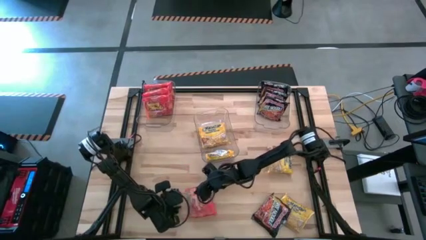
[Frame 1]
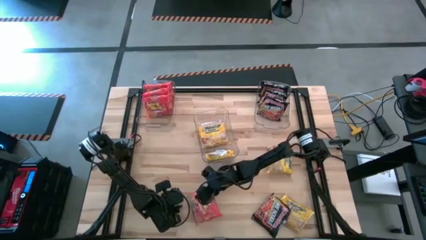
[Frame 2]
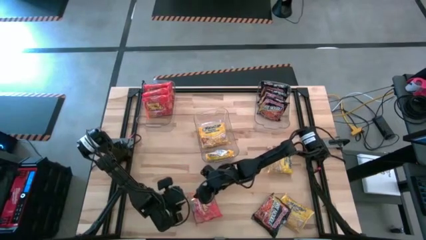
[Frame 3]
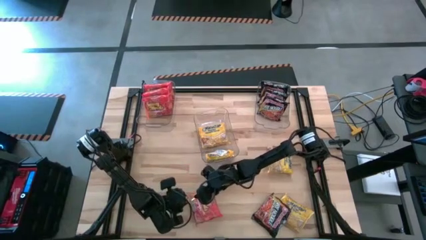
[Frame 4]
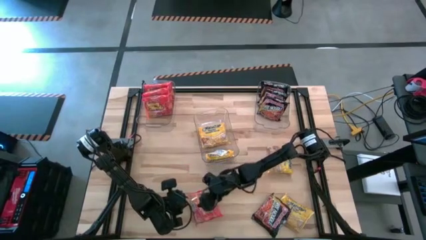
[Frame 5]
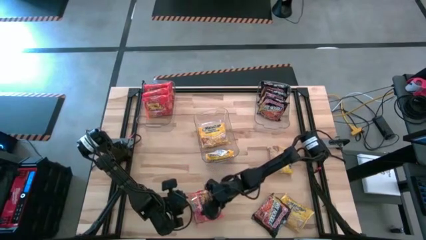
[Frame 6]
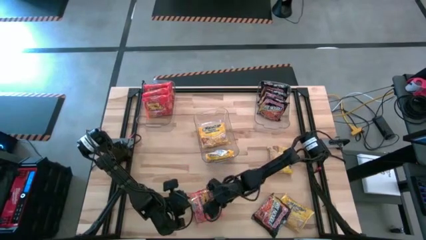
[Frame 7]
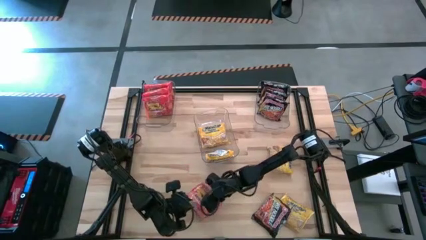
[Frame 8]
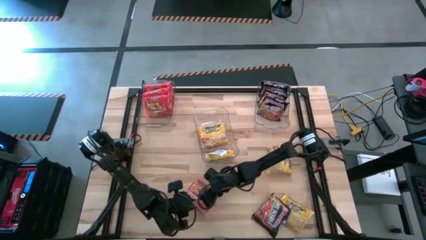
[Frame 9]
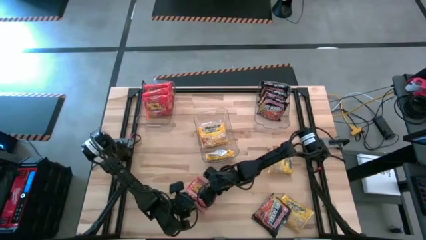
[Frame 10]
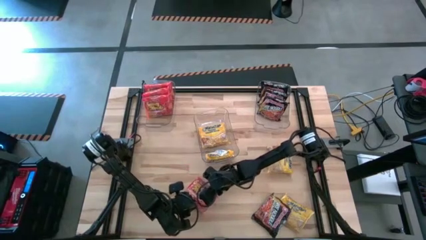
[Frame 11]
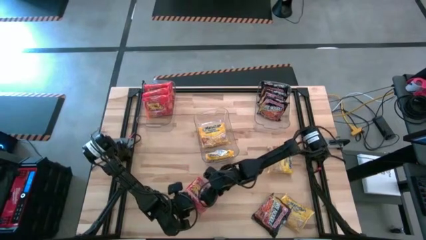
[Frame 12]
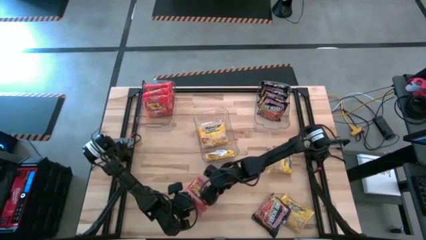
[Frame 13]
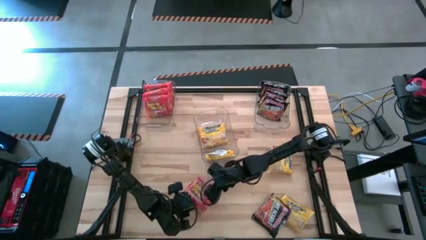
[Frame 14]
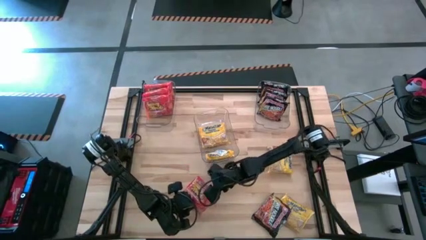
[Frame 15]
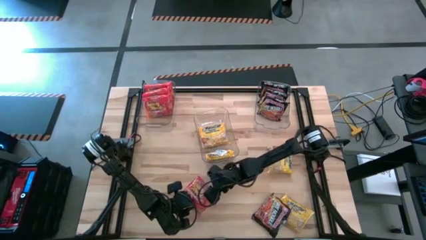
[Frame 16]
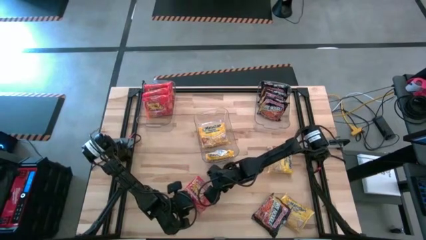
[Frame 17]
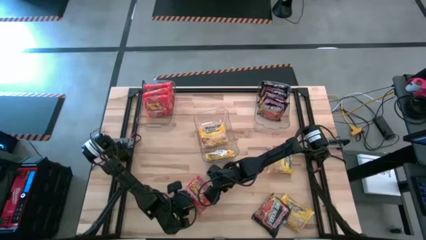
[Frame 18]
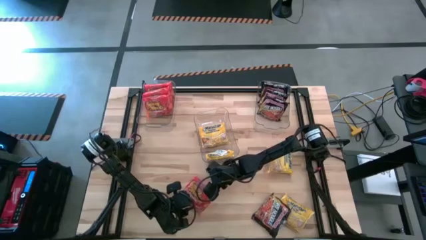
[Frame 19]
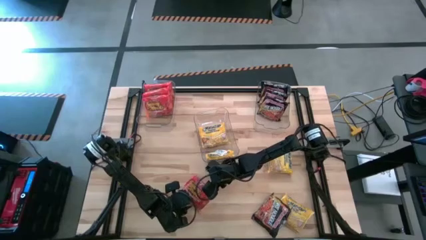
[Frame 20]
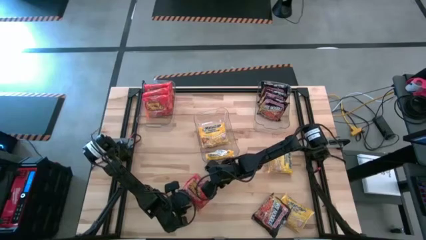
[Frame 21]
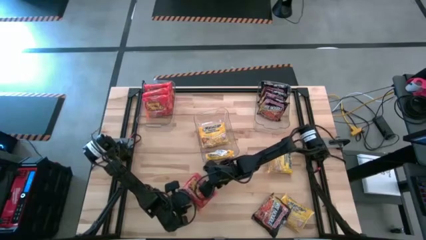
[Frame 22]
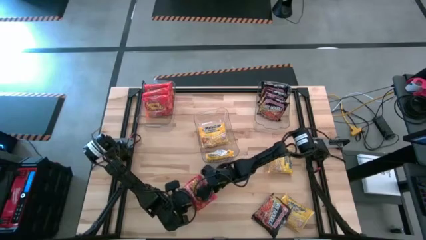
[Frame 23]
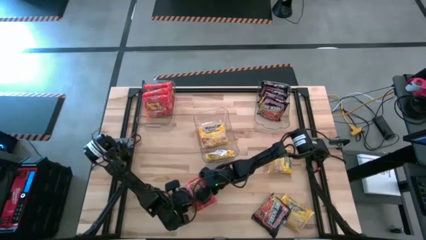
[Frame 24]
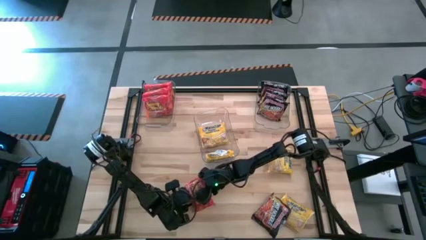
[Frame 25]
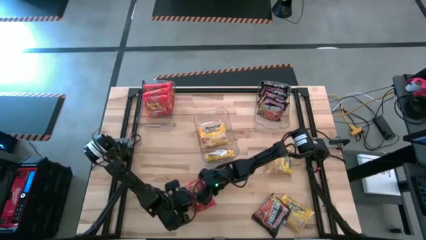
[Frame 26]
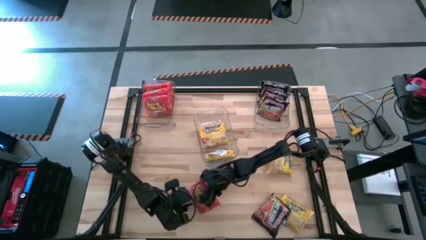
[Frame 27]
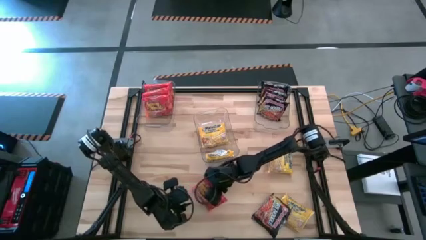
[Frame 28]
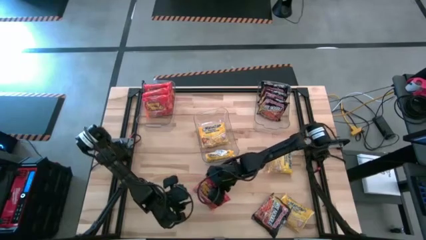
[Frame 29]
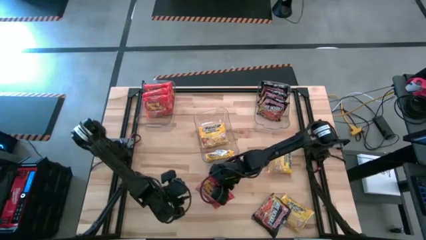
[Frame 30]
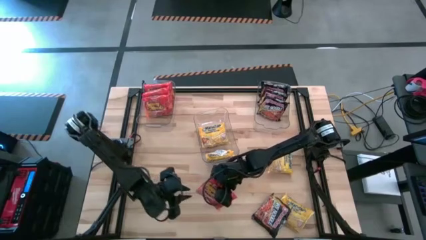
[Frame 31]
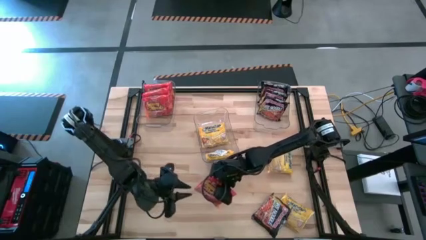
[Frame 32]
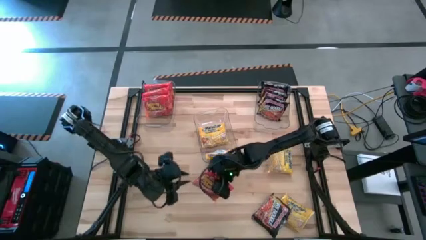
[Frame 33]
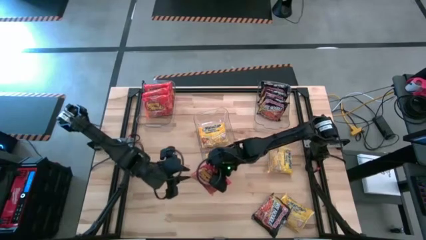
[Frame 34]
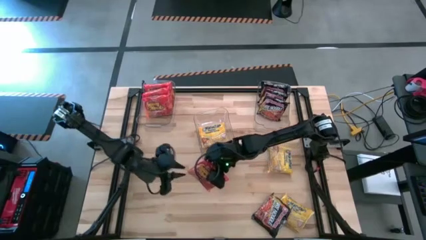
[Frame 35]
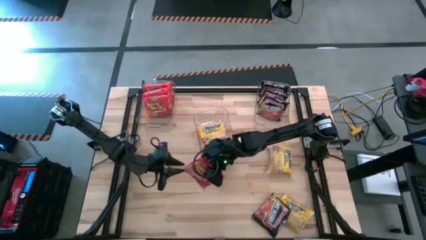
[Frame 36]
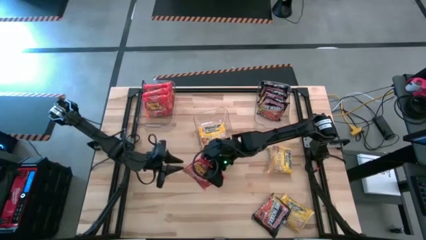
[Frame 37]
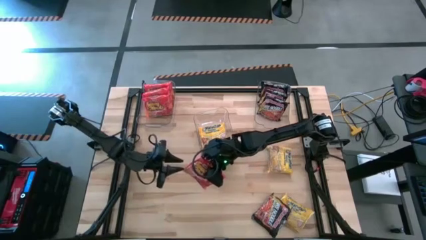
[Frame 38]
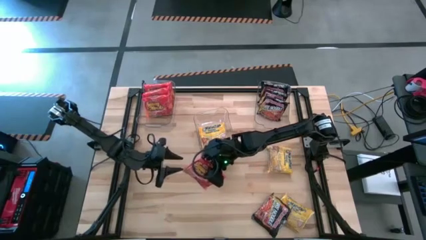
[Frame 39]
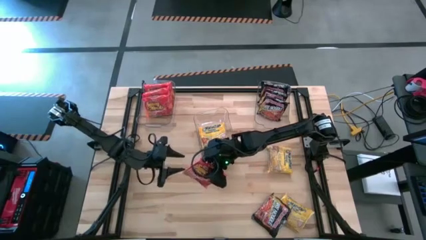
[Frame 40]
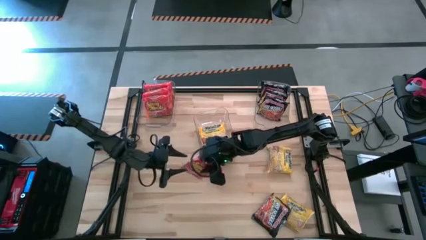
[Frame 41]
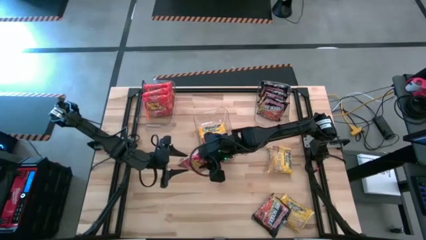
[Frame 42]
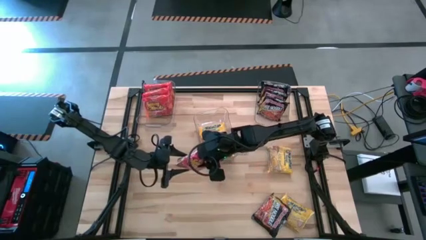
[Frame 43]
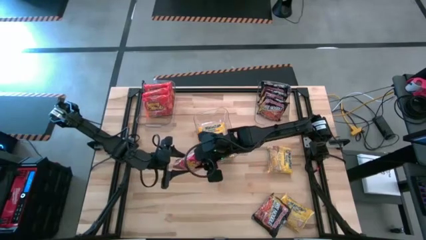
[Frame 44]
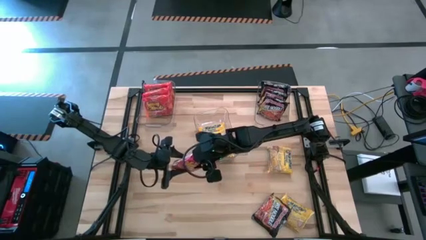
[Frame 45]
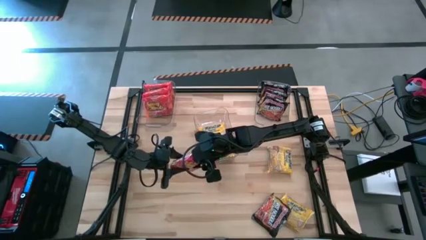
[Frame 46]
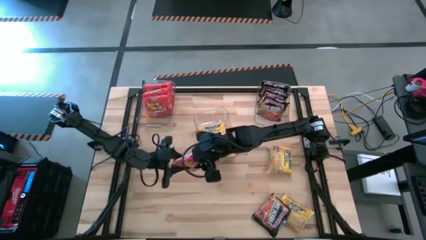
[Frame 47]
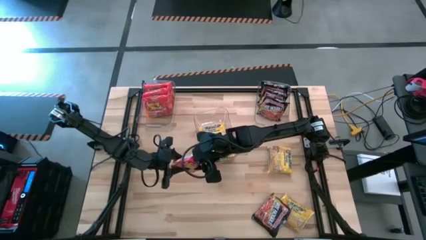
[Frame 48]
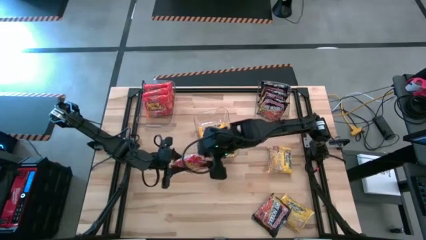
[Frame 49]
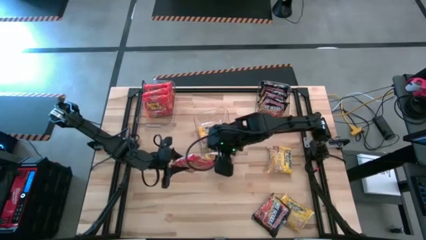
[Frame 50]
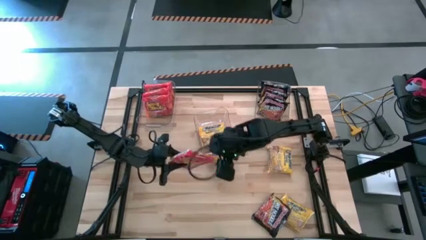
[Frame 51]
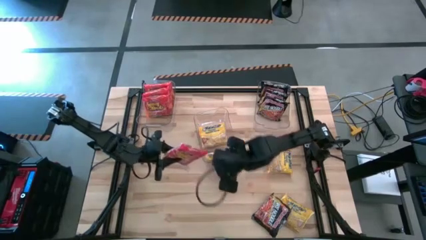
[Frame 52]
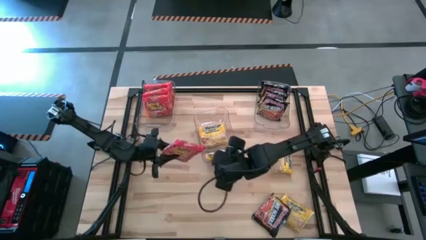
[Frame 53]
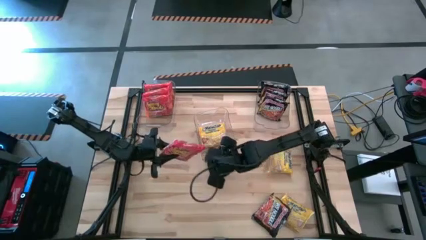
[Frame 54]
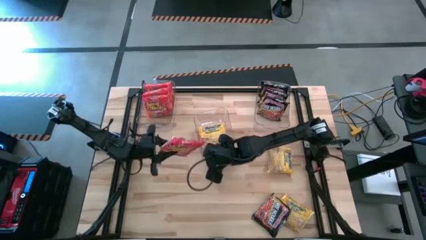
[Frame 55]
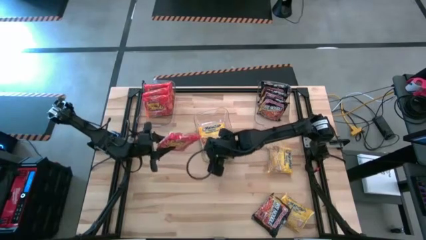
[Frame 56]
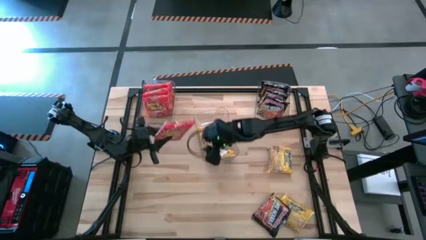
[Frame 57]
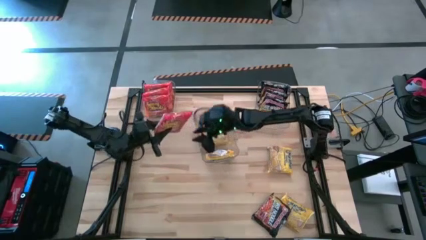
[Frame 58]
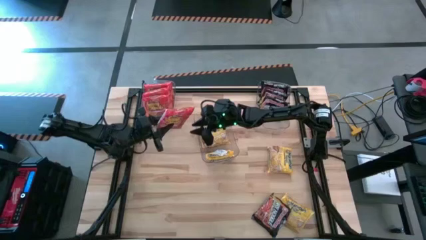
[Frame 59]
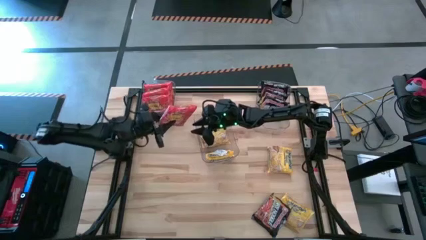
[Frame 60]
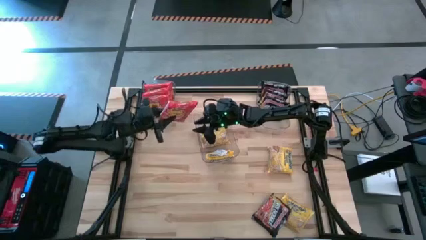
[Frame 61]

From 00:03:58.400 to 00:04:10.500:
Task: Sort Maruchan noodles
Put the orange noodle pack into the top left transparent bin

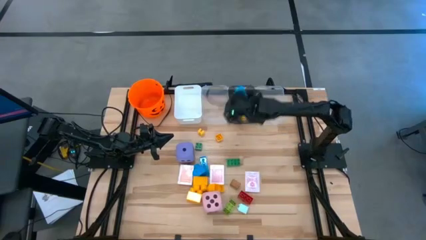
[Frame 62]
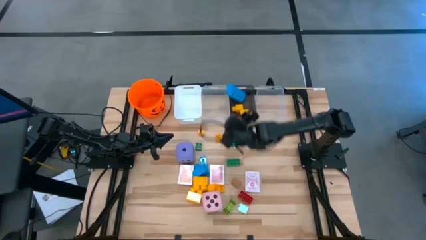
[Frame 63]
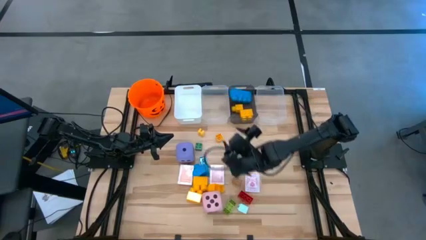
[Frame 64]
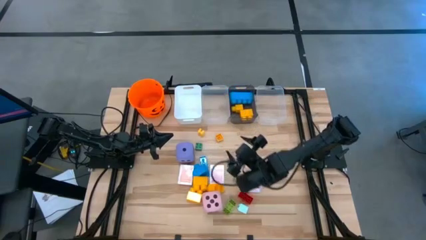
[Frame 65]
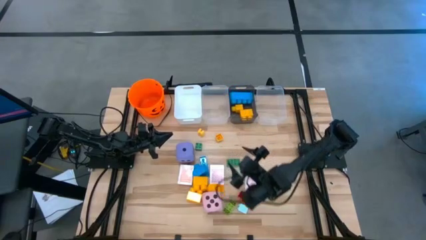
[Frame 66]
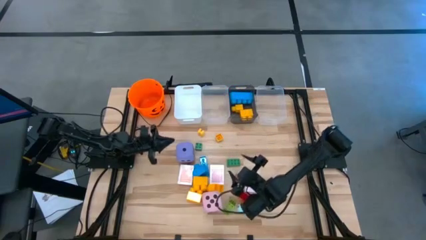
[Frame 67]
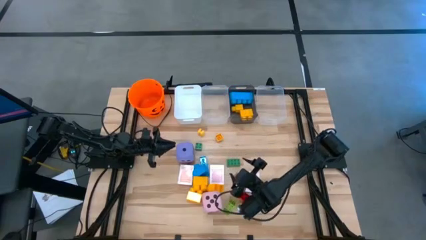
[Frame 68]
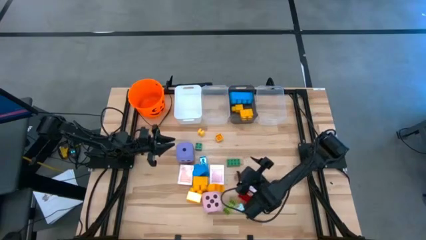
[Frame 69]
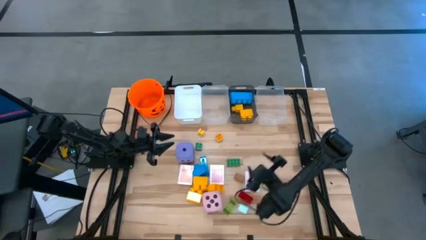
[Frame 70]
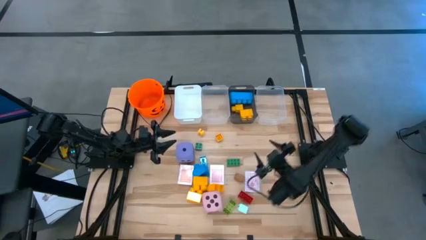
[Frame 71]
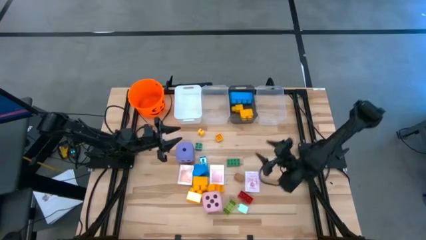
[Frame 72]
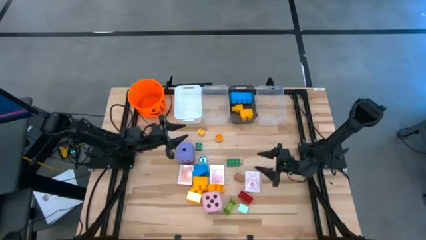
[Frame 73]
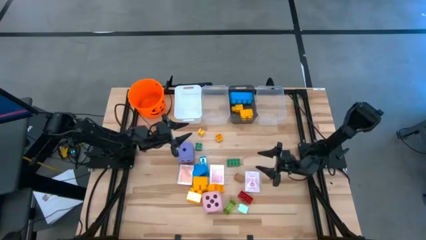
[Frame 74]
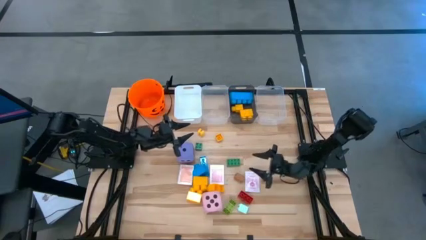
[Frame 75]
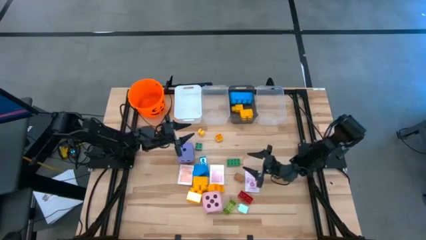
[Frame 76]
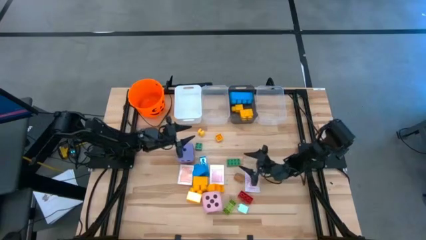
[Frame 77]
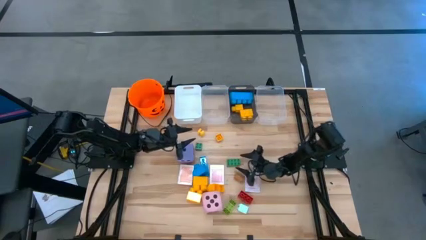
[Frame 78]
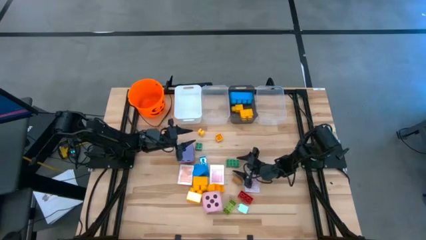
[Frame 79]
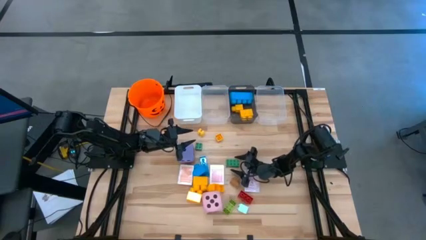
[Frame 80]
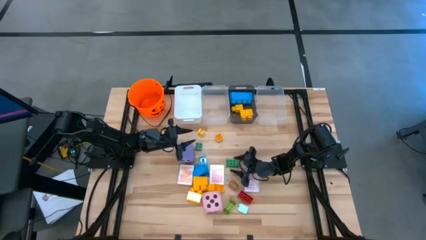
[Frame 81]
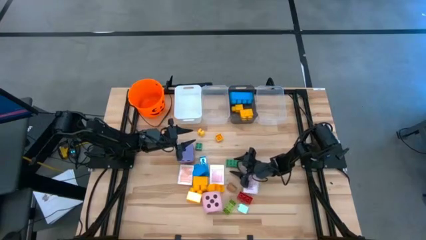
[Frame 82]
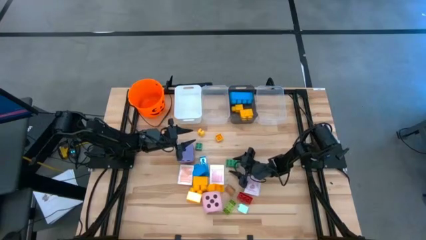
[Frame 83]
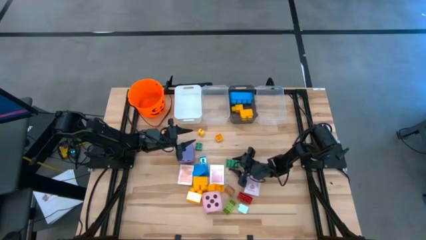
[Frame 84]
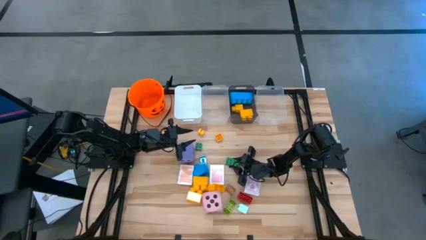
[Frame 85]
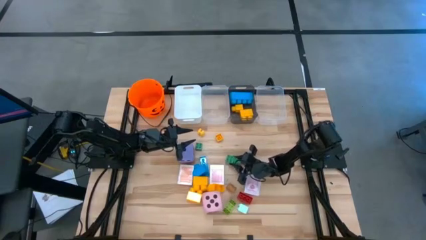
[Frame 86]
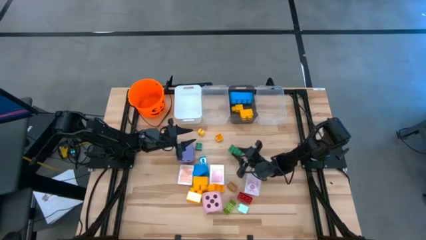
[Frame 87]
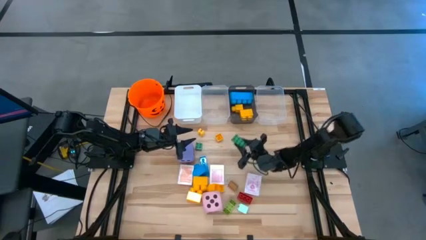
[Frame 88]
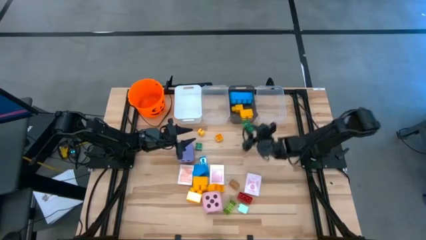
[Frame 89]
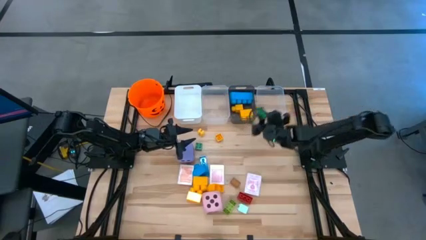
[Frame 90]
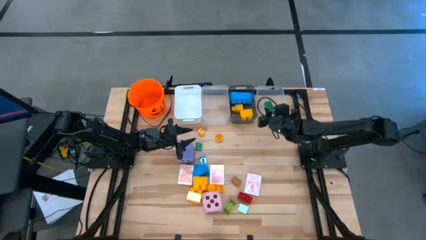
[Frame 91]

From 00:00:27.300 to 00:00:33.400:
Task: Pick & Place Toys
Put the small green game piece into the right transparent bin
